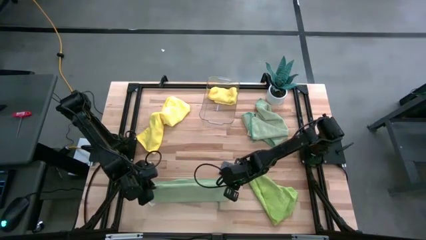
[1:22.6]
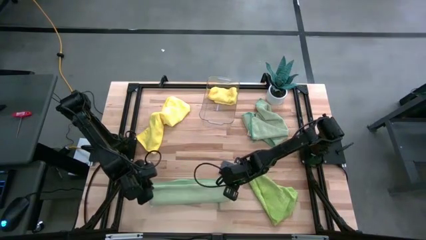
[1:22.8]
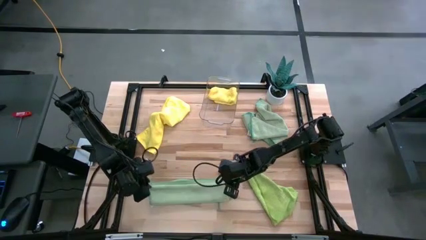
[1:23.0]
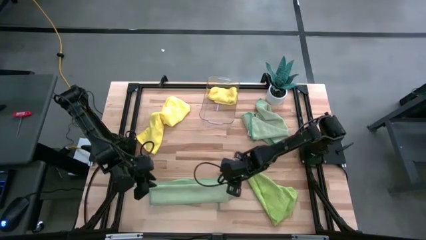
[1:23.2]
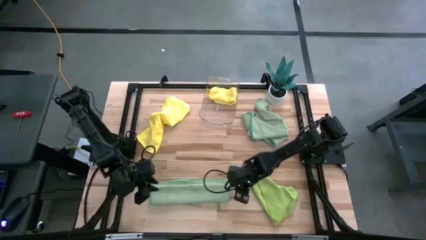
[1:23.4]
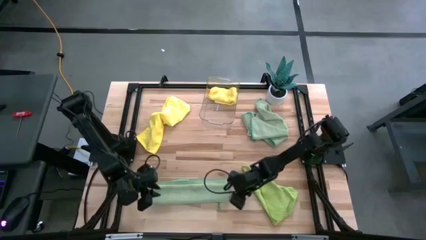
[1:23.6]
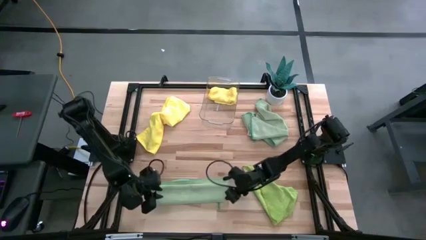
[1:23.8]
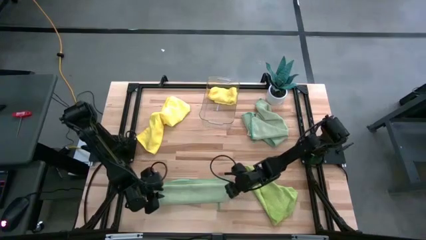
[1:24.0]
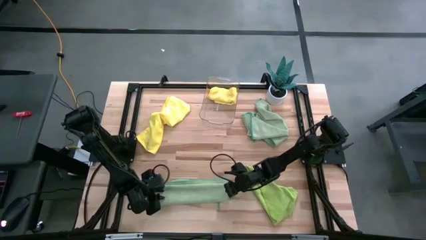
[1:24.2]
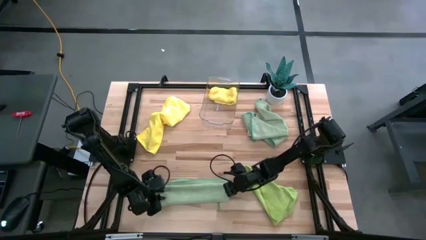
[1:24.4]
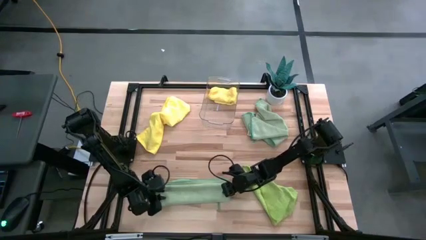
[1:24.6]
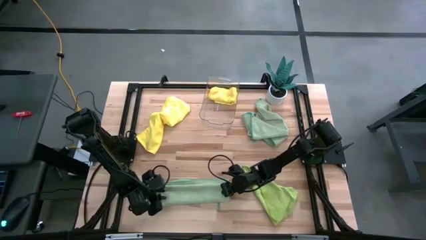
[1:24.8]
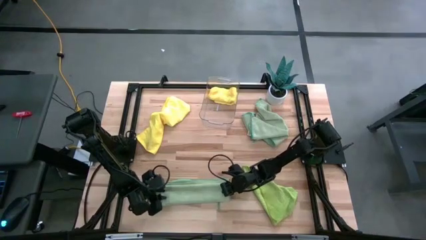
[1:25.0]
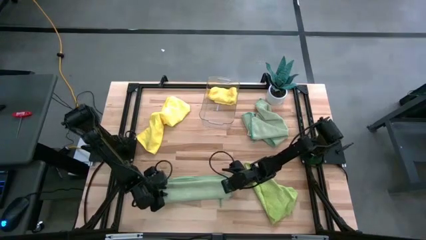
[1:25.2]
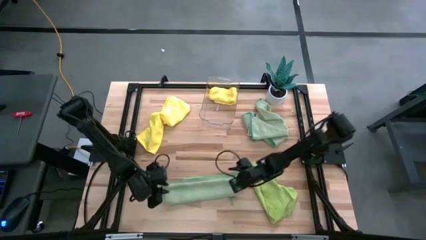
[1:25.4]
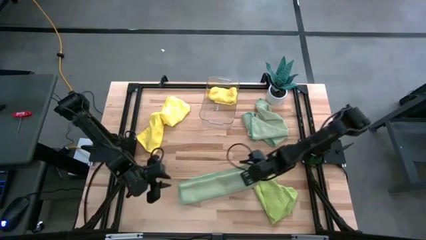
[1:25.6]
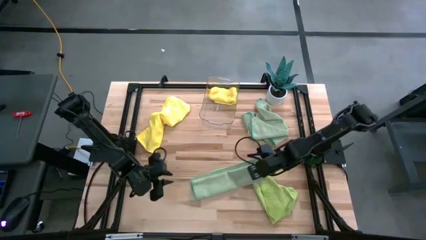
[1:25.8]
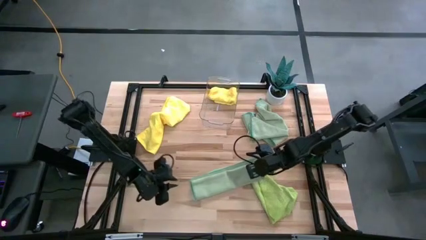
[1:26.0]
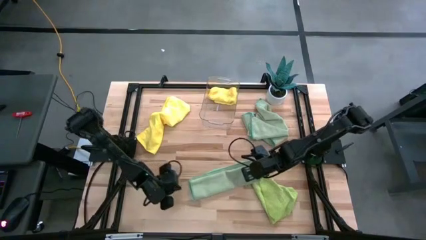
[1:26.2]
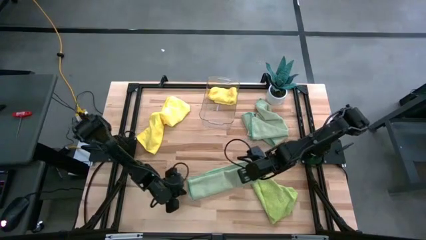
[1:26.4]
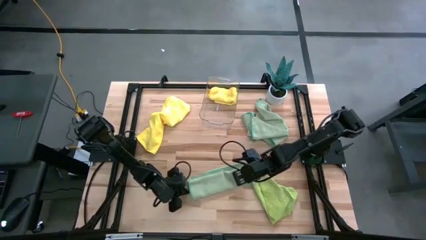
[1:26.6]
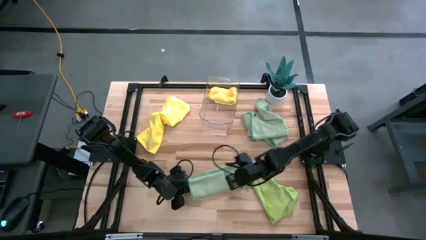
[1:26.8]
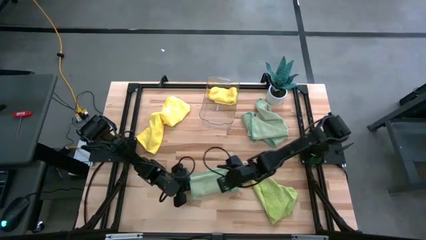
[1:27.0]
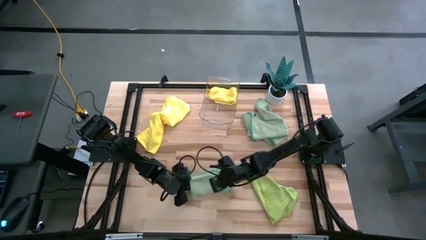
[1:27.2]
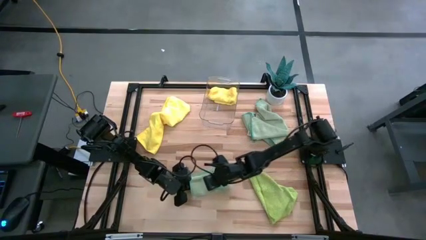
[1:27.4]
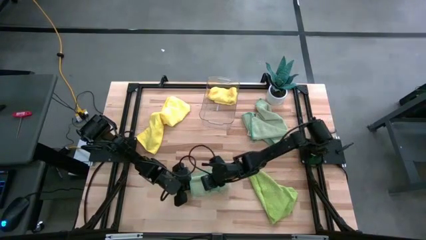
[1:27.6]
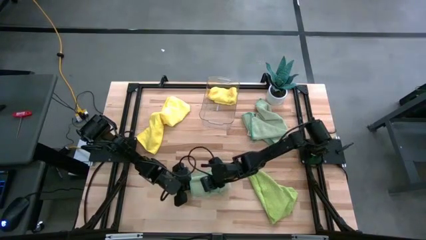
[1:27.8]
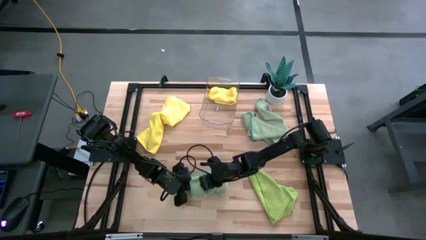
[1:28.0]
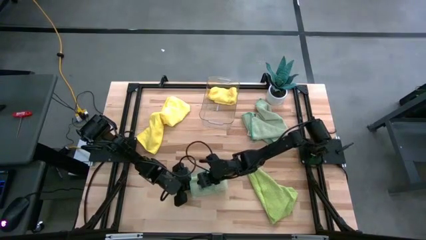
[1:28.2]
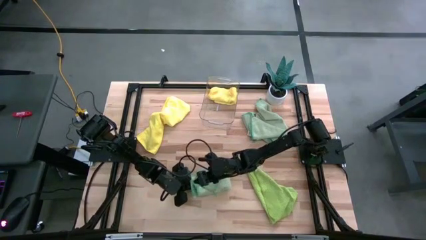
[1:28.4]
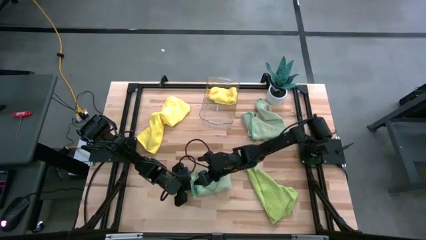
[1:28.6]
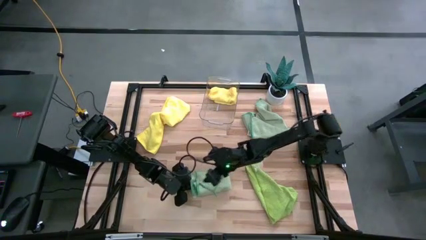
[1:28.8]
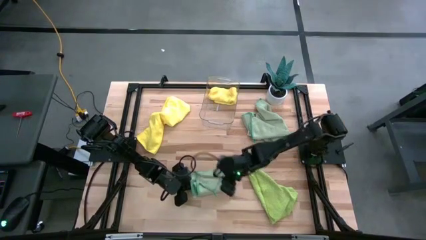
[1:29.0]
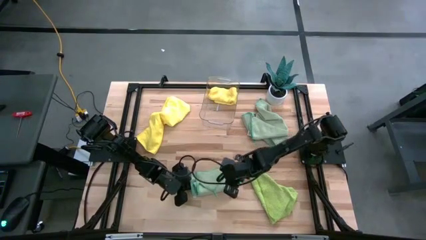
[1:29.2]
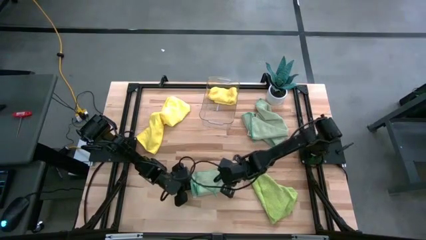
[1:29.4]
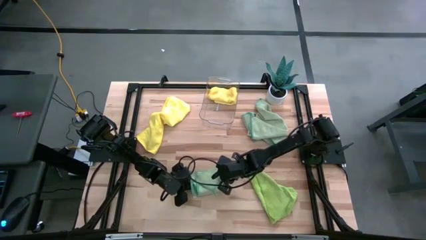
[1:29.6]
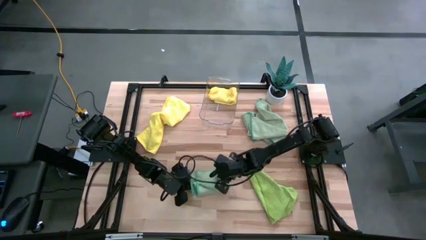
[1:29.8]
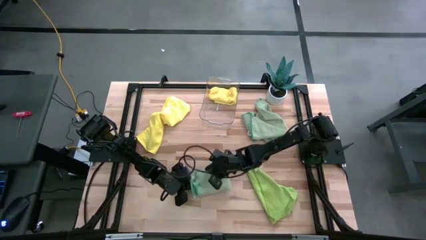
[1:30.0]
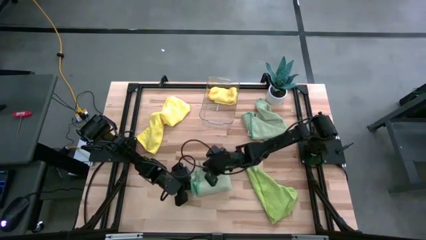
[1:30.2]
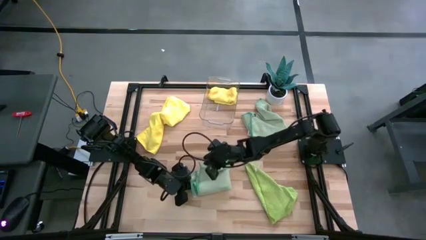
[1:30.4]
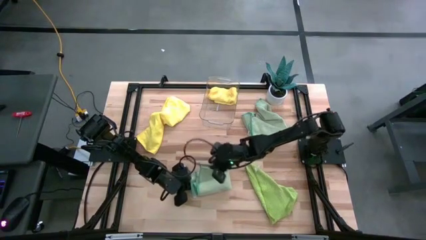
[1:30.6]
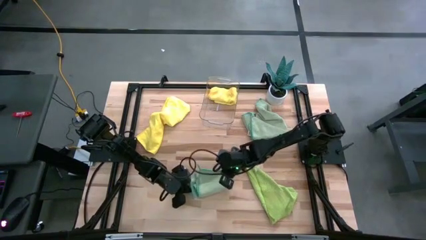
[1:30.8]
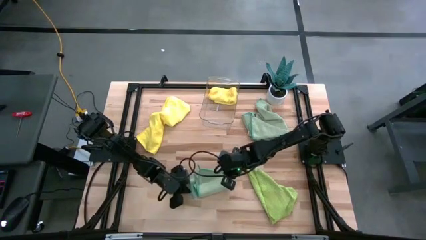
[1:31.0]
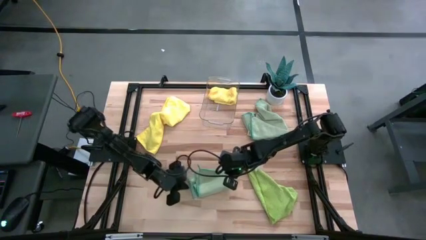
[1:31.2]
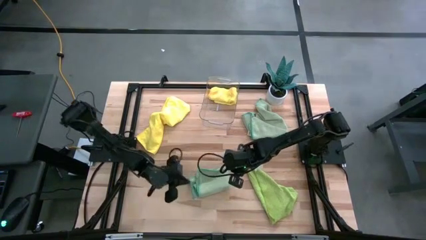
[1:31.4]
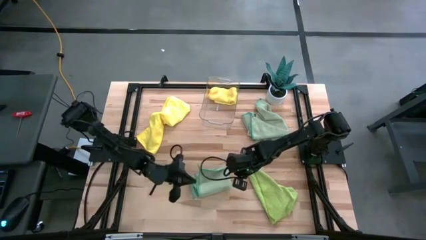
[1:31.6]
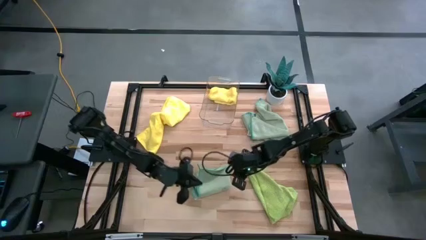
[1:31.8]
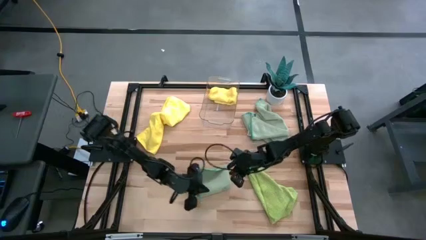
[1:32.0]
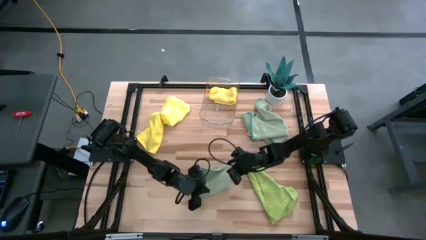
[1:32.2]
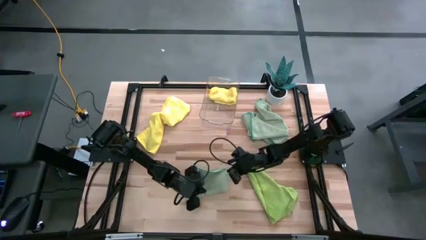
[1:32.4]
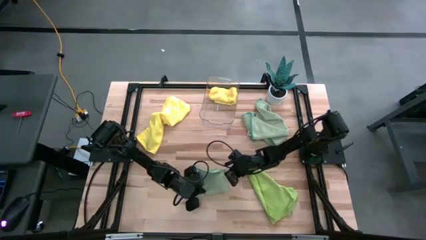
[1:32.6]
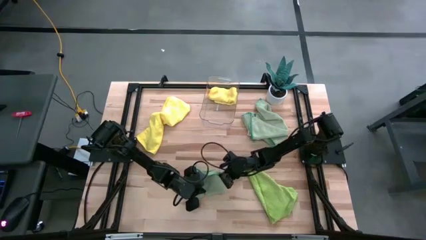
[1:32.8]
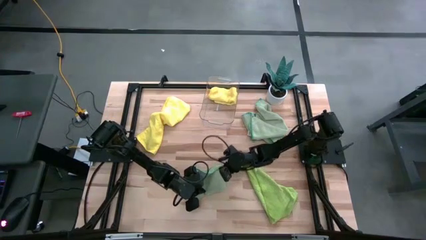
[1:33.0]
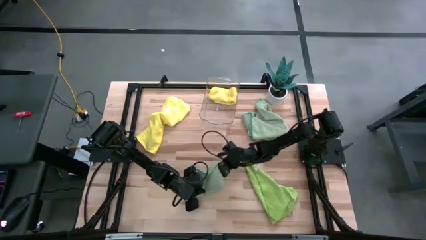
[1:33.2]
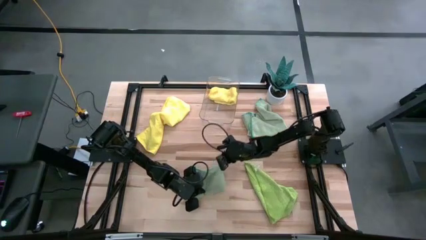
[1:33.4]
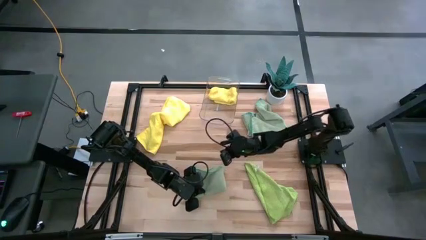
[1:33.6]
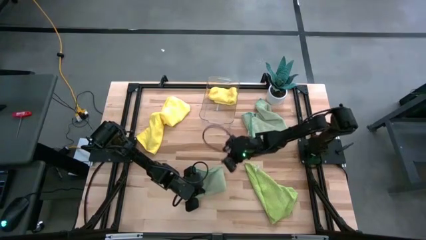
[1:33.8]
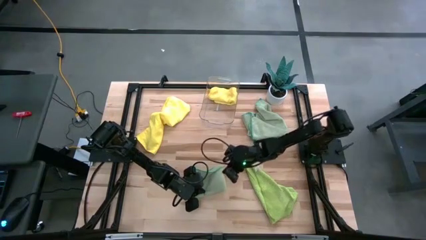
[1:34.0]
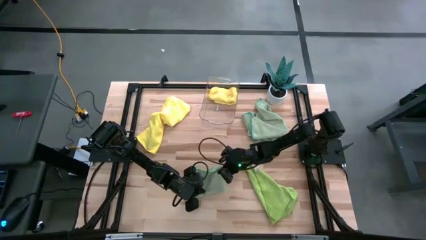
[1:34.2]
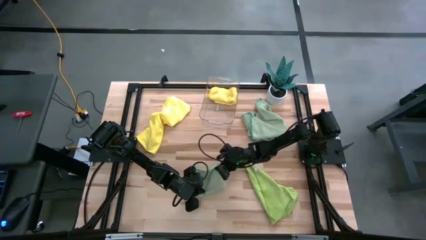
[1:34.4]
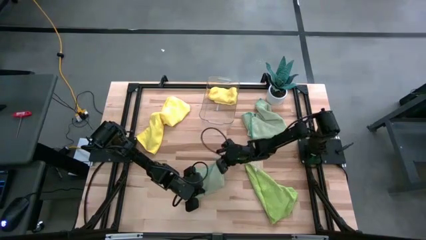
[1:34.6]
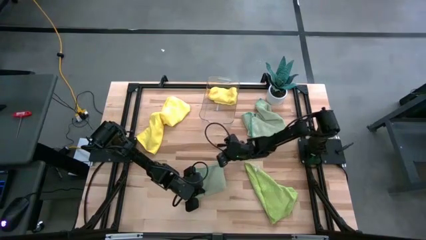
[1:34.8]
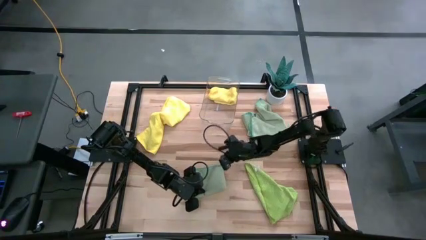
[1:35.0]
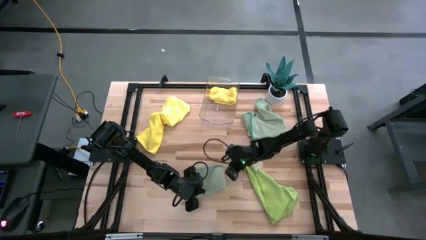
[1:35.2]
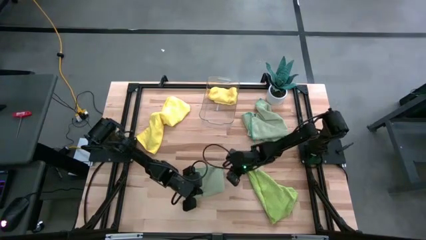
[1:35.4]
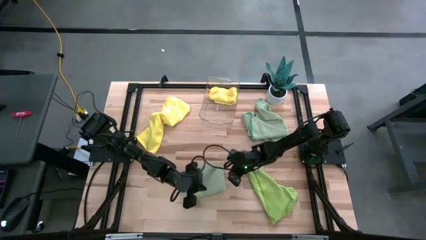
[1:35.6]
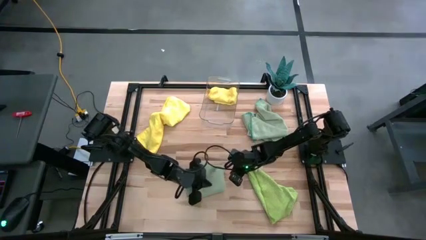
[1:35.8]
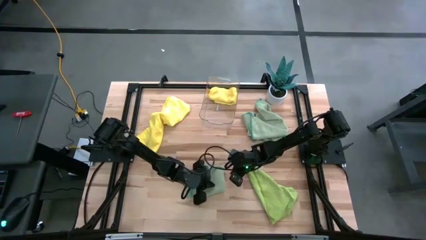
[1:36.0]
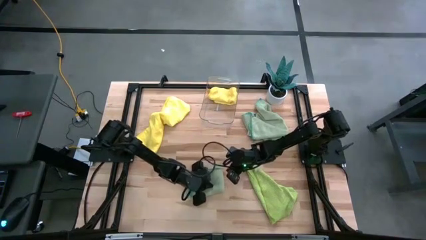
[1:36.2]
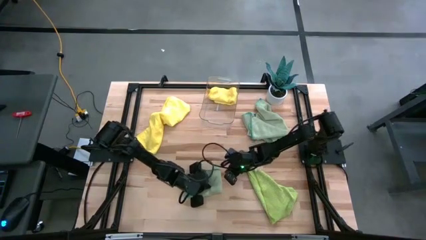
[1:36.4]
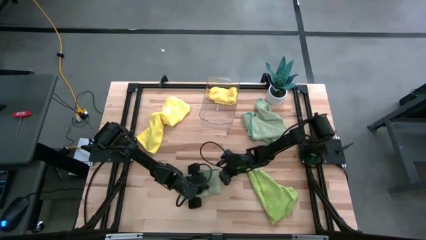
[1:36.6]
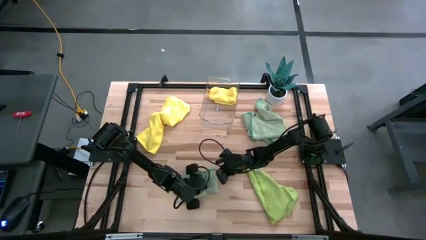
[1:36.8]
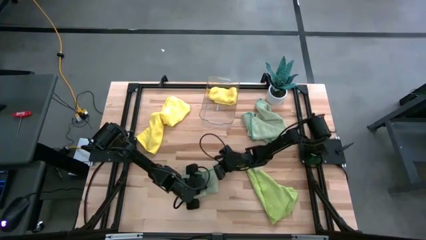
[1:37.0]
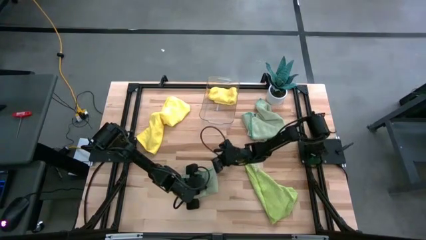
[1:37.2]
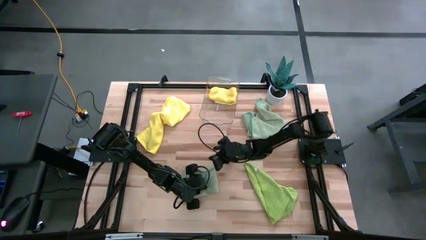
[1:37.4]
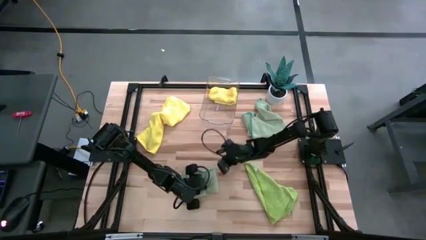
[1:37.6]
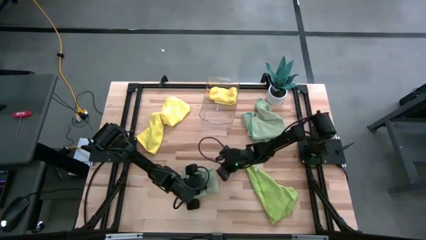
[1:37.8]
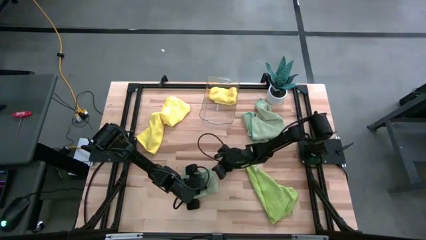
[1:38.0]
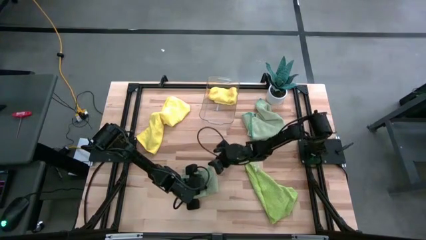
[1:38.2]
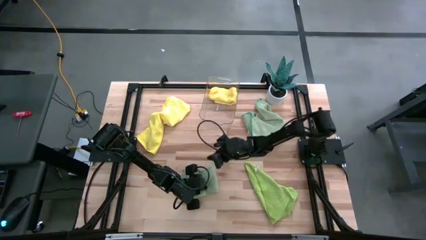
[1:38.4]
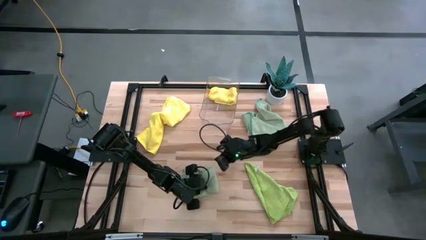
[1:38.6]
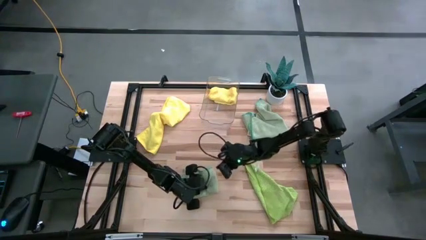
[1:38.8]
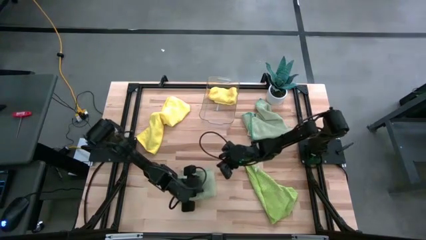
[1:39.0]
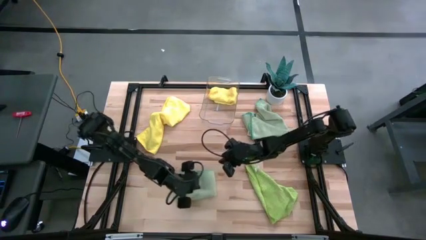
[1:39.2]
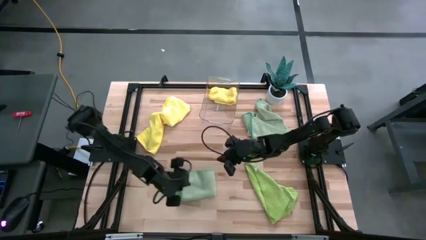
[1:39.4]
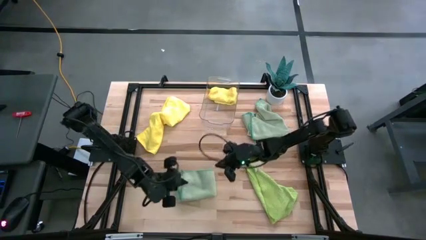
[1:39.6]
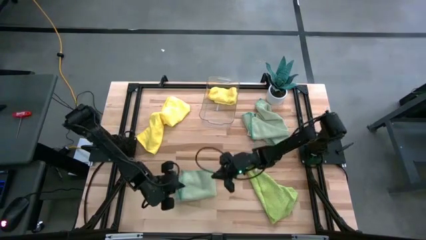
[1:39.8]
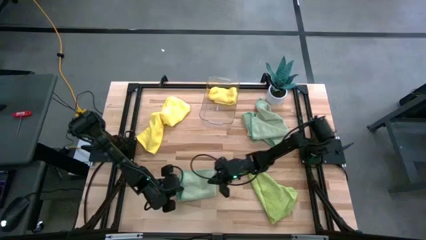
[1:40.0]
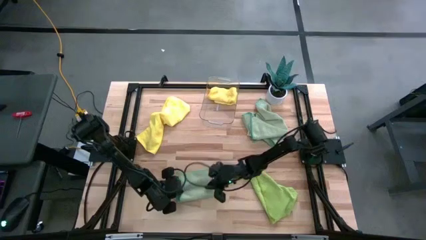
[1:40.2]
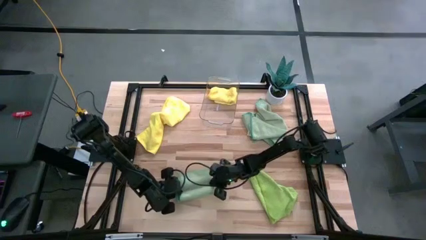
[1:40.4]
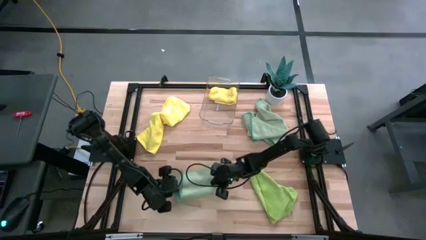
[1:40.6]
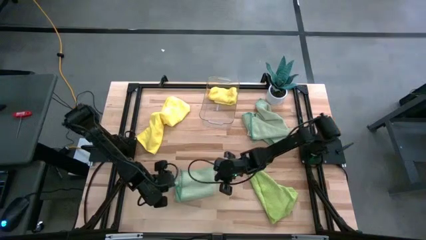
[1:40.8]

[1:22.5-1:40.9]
Task: Fold microfiber towels
Fold the bottom left blue towel
